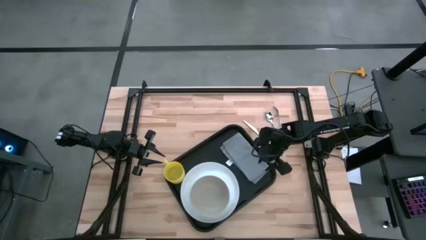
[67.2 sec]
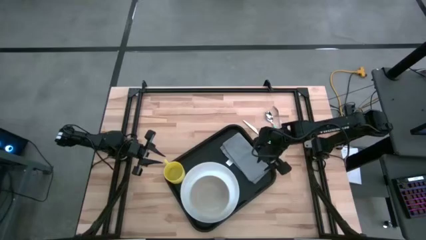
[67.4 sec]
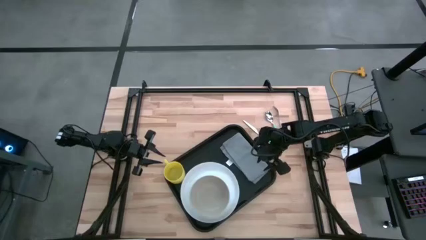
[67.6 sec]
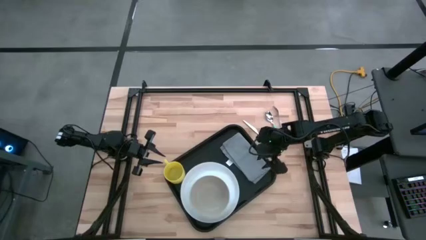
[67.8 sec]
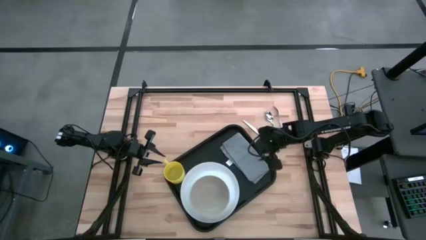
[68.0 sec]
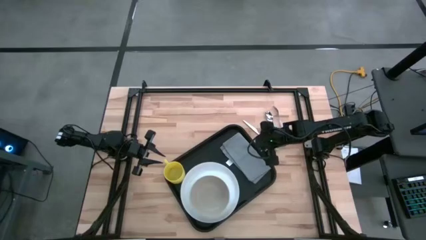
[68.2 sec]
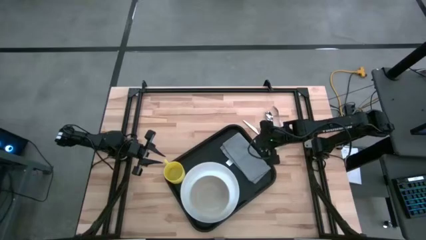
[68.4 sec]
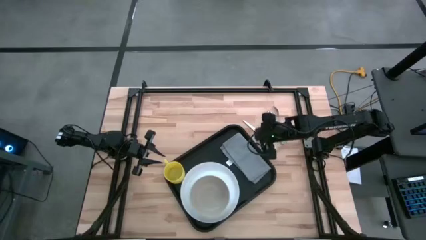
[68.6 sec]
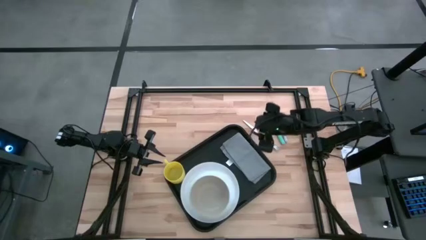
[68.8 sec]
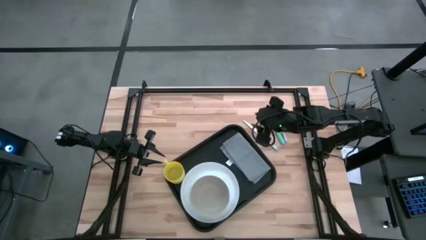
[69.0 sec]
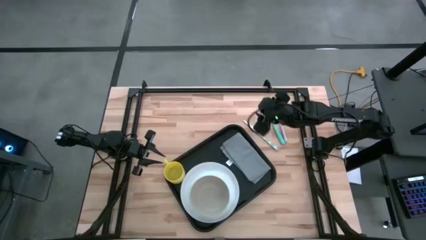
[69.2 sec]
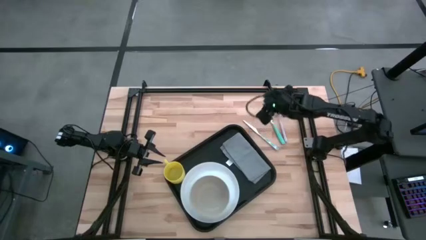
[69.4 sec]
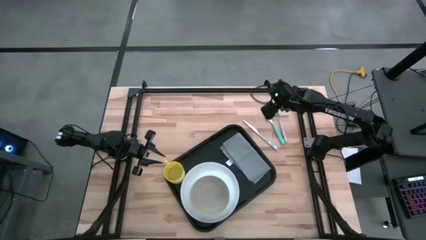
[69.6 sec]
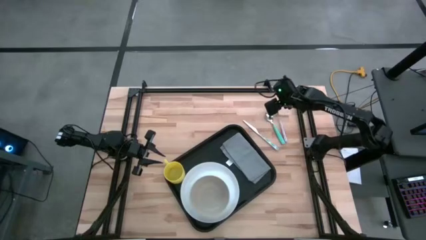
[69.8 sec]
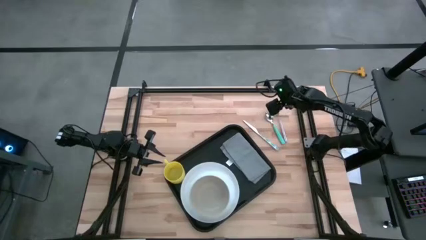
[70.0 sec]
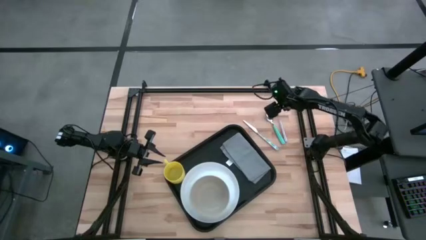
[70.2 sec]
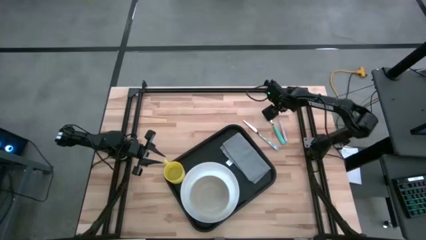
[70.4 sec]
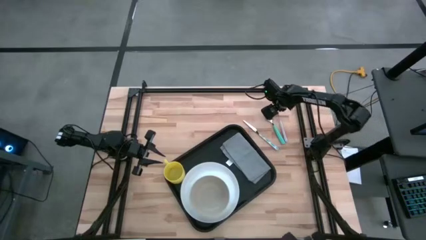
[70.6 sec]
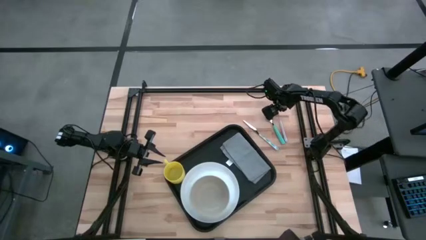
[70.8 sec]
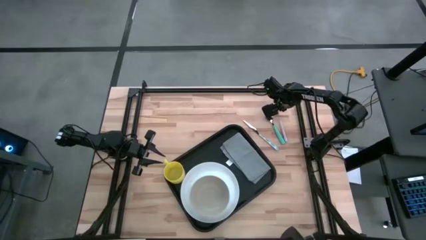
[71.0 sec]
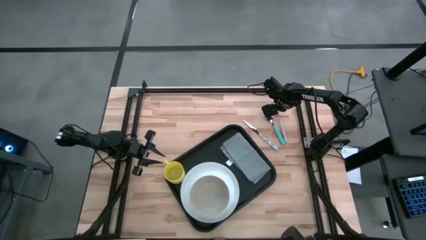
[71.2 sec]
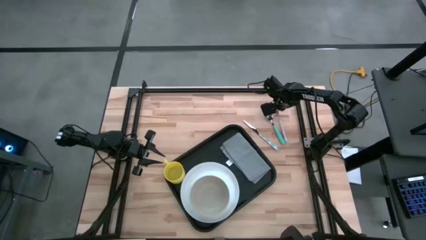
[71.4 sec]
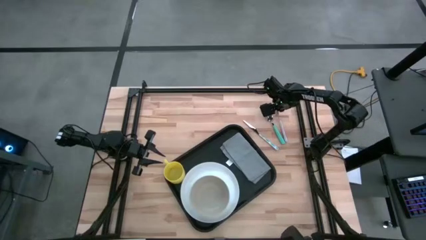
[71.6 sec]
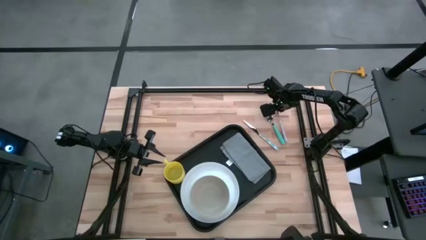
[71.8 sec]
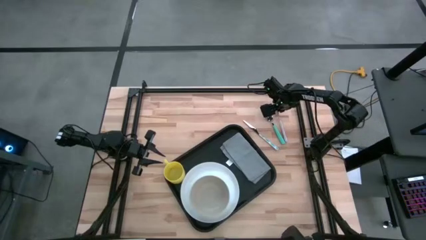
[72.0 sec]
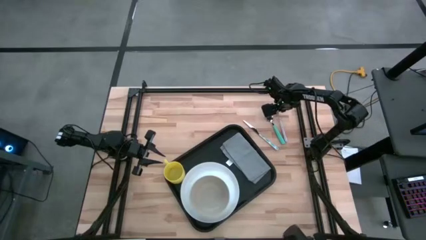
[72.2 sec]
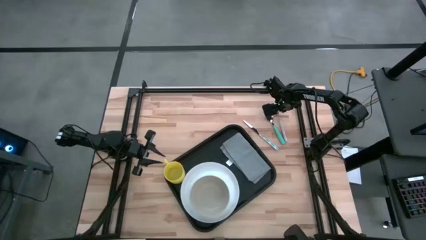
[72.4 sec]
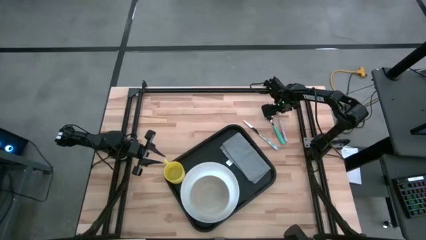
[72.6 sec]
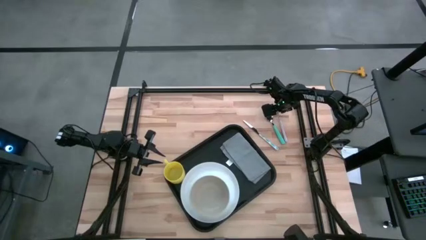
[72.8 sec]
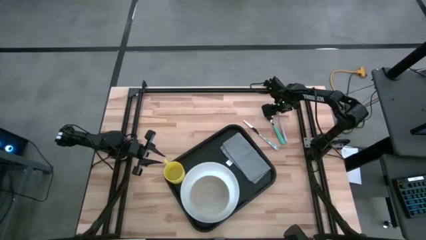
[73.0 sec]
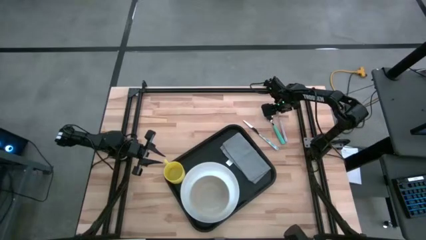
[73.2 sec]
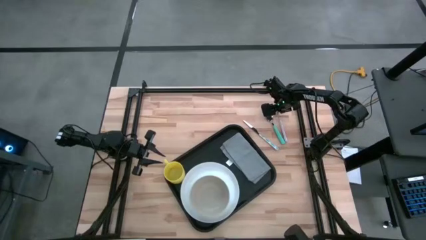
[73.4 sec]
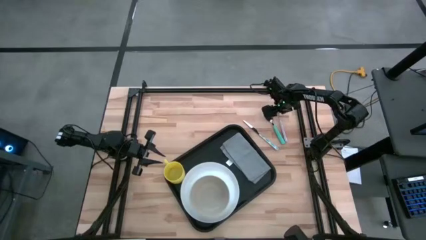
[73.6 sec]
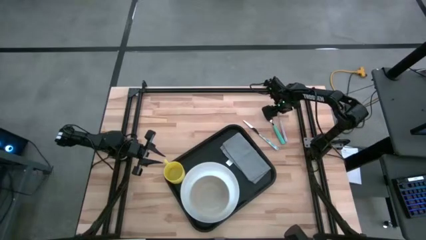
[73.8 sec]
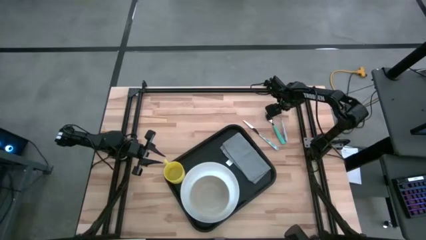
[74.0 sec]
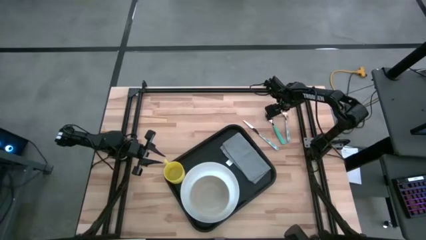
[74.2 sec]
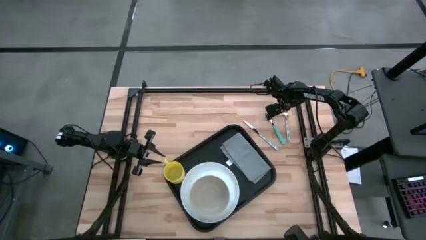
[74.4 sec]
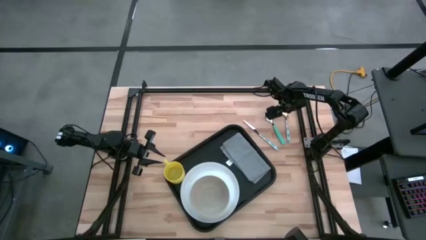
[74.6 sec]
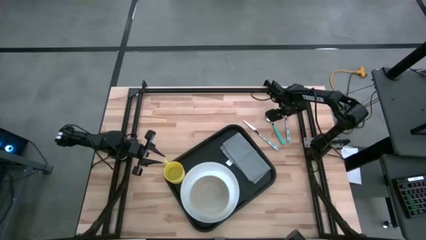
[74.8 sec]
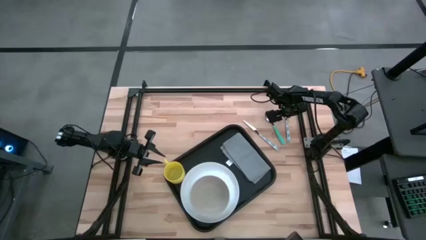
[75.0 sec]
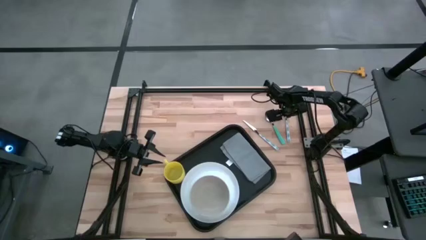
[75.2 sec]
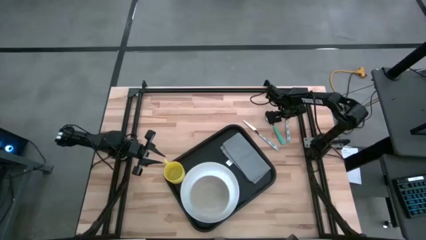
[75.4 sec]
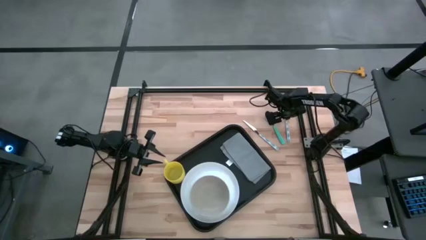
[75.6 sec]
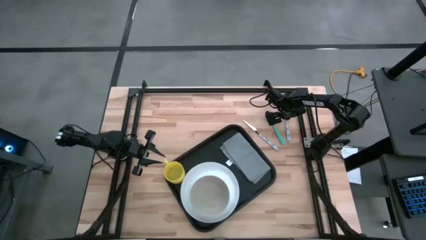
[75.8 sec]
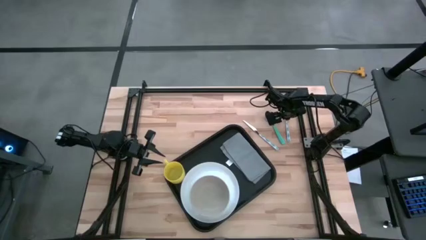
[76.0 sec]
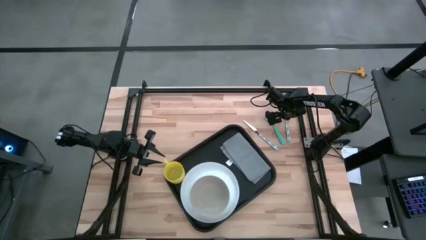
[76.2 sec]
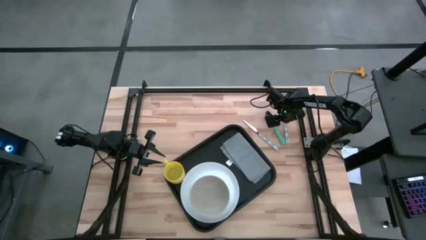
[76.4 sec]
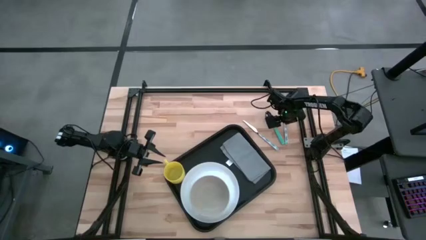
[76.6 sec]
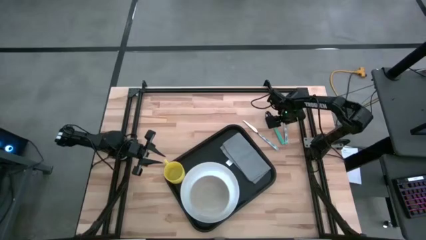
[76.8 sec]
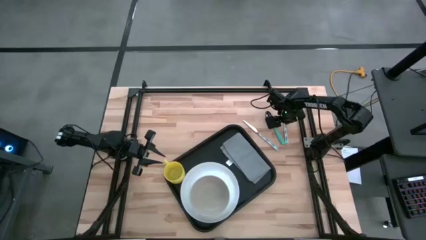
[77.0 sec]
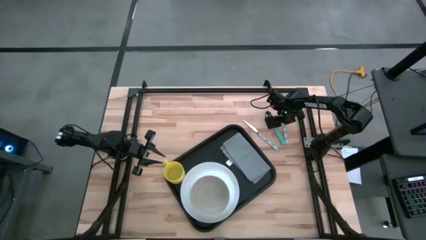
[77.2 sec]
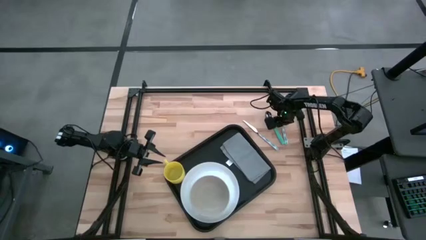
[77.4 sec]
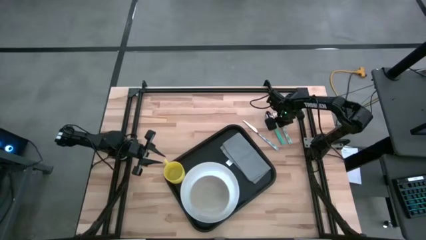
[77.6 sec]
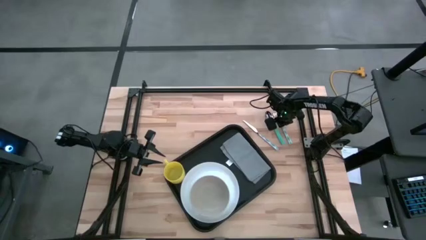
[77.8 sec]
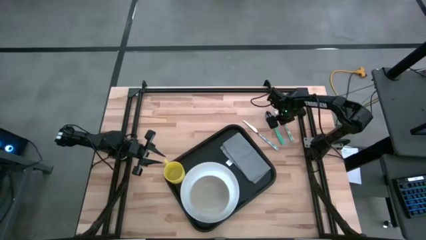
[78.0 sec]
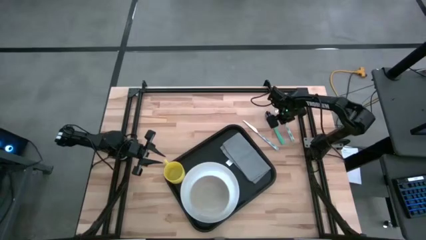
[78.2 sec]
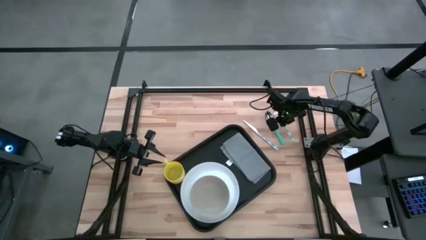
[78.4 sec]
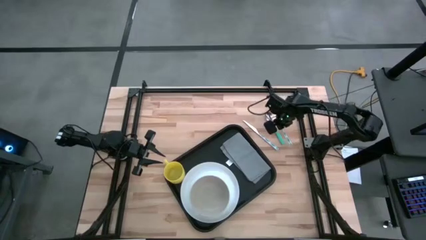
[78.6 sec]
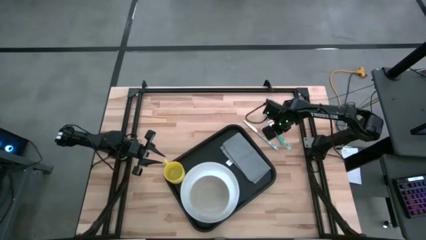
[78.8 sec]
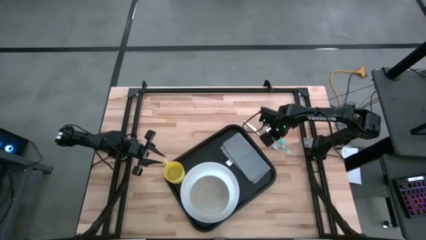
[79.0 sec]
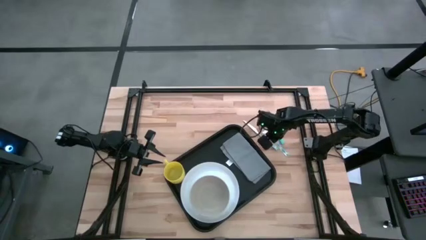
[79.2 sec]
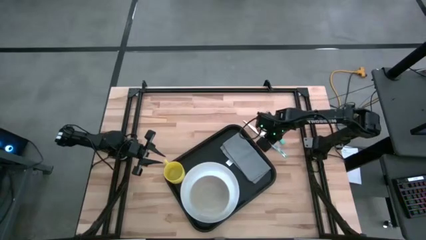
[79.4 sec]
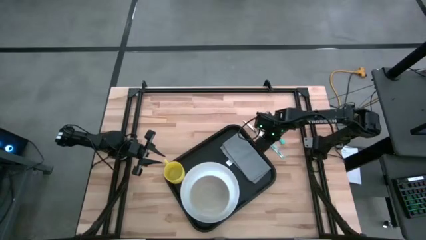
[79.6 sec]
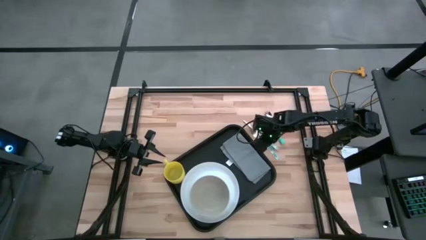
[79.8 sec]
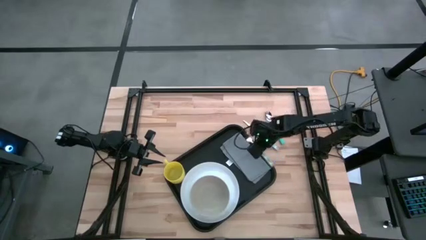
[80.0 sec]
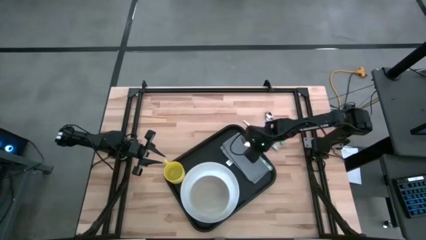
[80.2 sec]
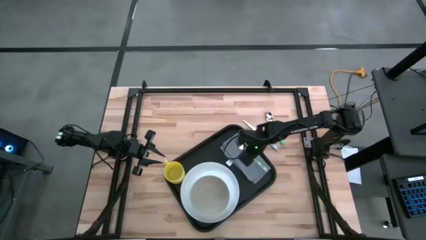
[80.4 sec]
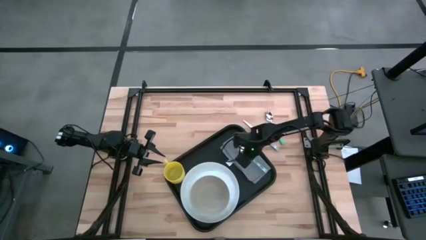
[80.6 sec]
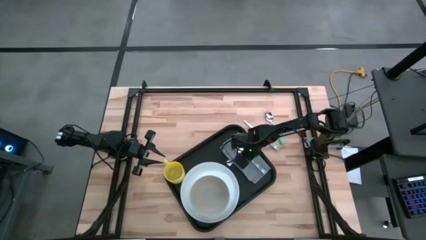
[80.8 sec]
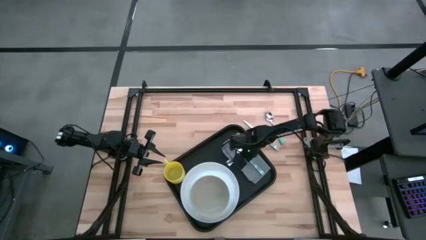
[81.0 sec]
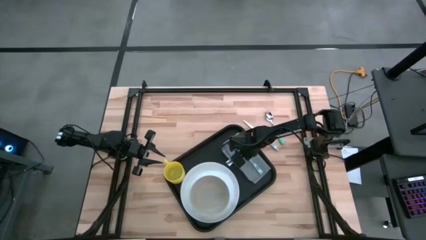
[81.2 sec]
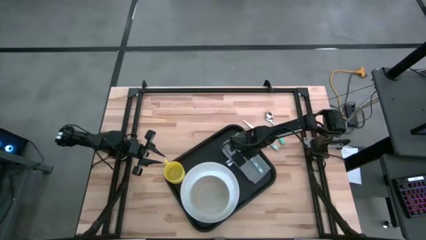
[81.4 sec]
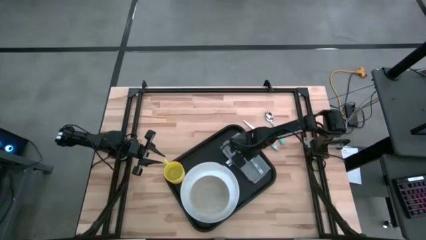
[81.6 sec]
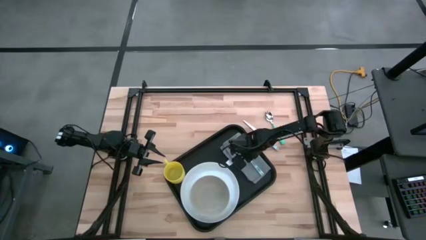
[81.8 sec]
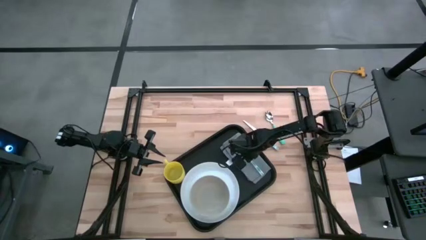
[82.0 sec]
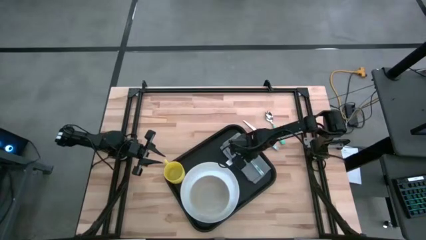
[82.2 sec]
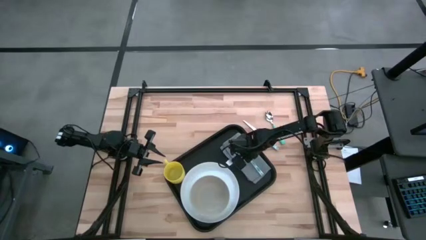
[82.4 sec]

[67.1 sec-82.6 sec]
Task: Set up tray
Put the light blue fork on the gray napkin
